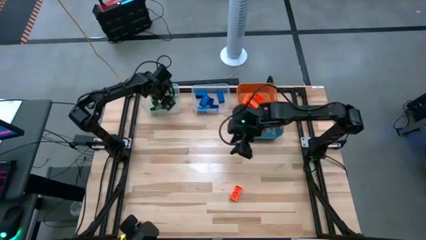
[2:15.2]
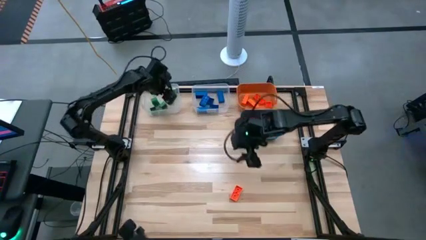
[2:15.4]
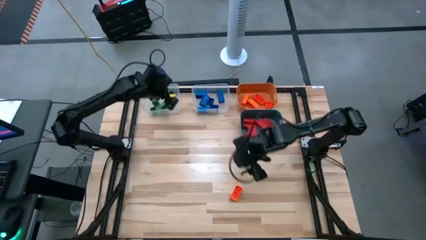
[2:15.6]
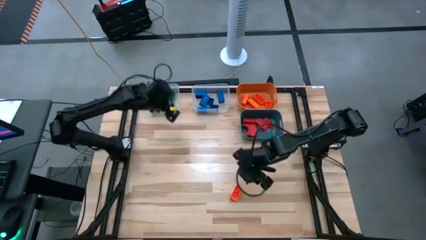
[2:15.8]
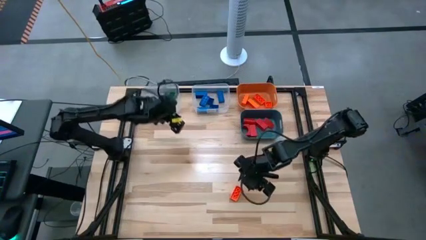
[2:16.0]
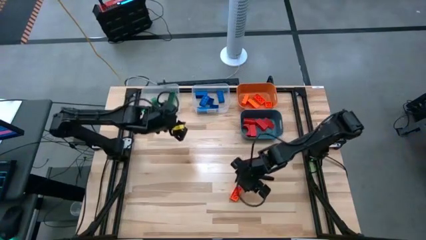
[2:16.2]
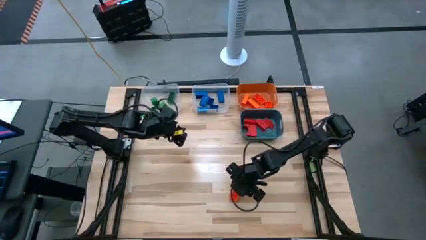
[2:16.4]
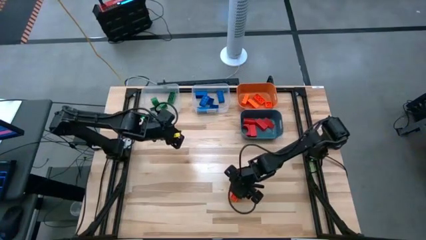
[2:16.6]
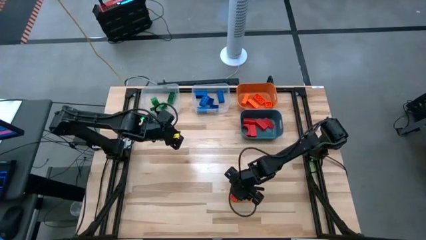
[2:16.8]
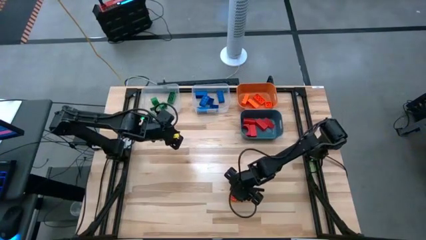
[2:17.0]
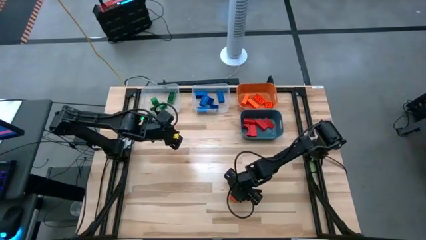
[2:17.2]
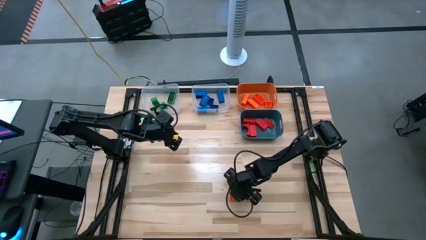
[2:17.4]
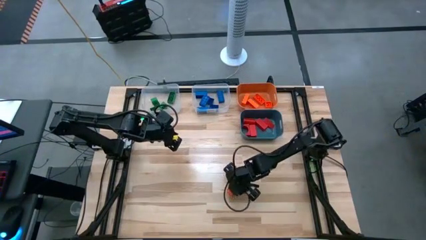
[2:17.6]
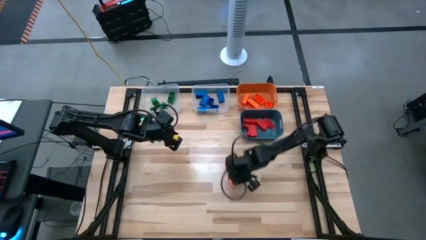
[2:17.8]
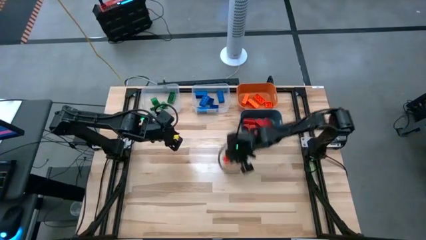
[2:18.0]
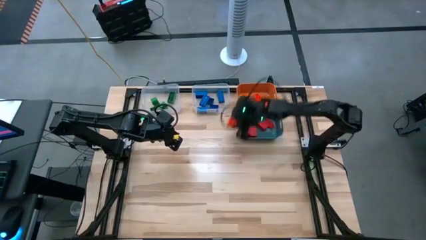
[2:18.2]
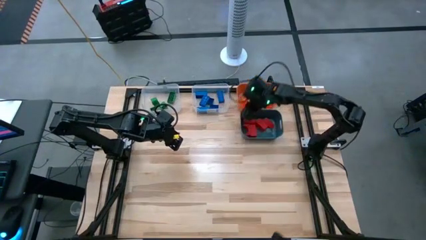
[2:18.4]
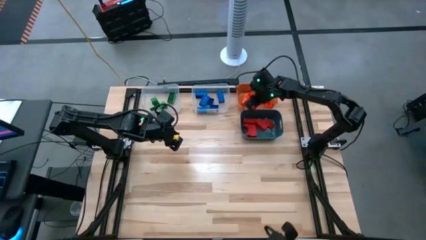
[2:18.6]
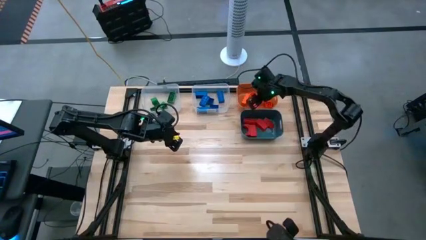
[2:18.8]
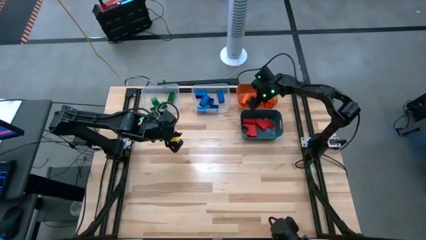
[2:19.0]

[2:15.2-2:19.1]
Task: Sort blocks
Put the orange game piece into the orange bin

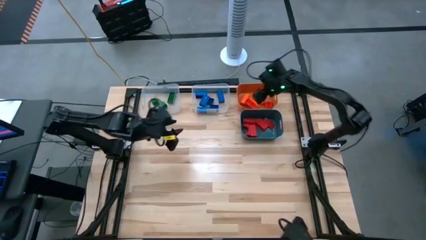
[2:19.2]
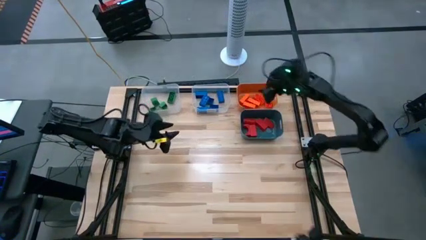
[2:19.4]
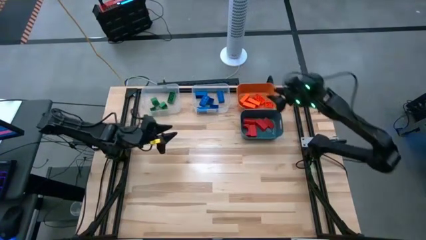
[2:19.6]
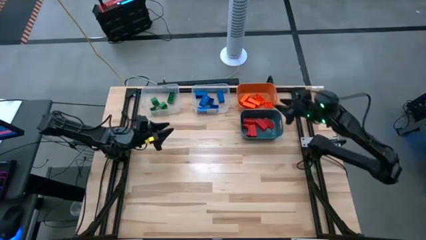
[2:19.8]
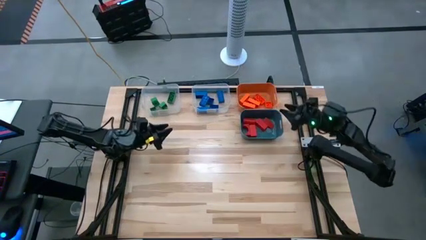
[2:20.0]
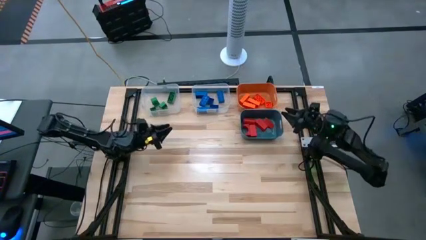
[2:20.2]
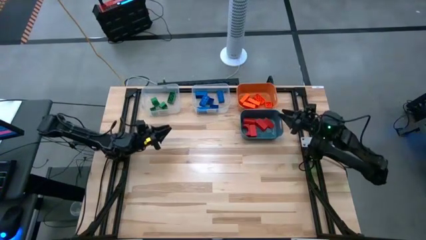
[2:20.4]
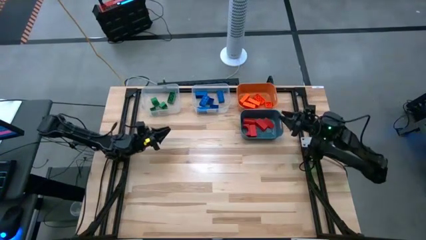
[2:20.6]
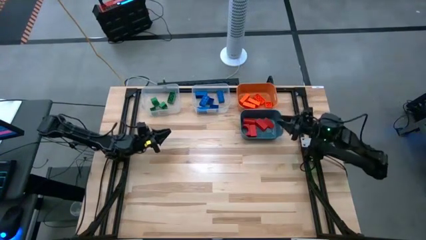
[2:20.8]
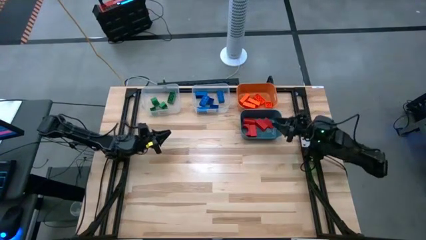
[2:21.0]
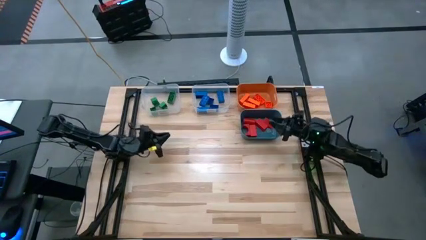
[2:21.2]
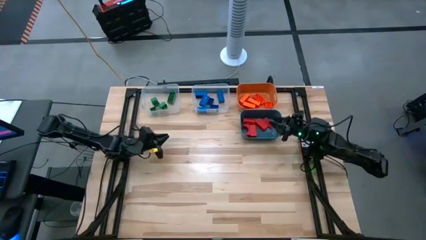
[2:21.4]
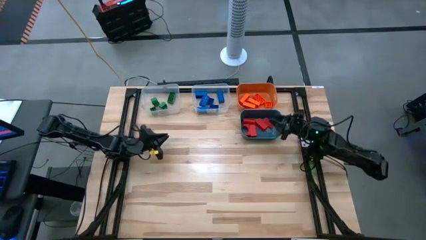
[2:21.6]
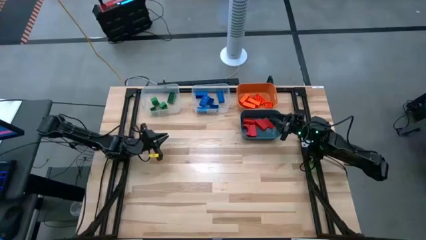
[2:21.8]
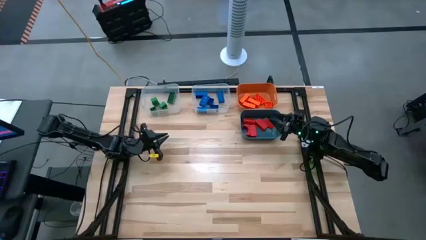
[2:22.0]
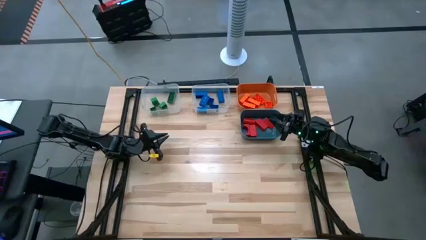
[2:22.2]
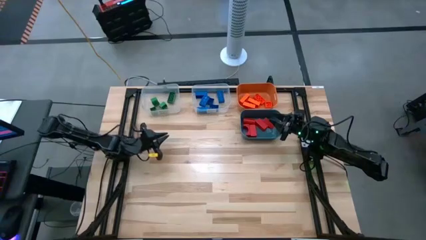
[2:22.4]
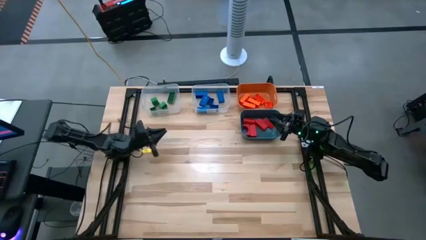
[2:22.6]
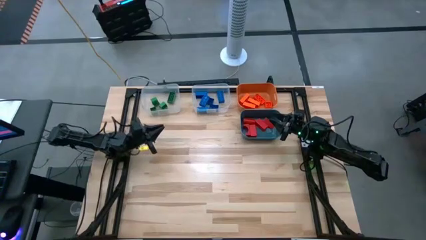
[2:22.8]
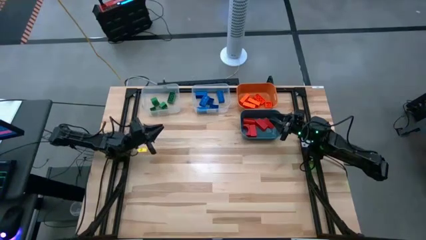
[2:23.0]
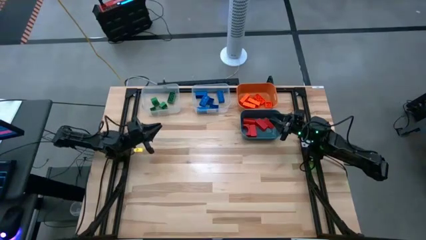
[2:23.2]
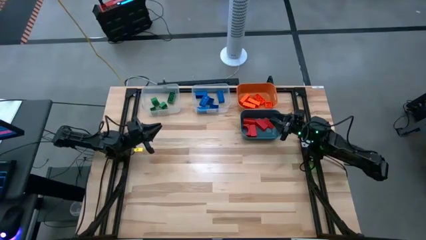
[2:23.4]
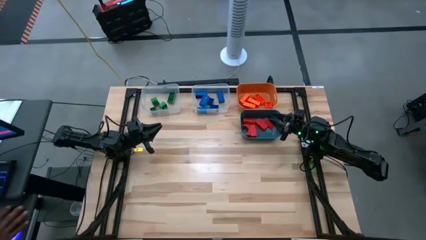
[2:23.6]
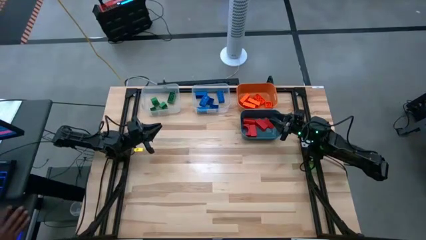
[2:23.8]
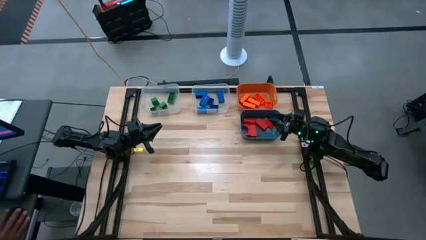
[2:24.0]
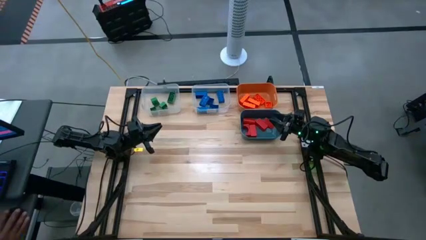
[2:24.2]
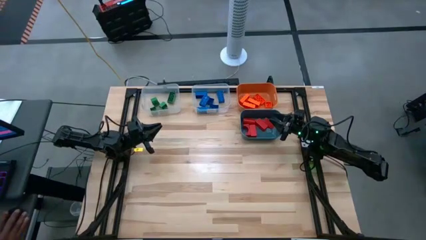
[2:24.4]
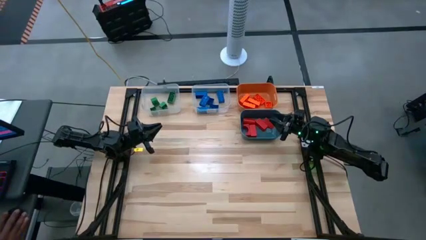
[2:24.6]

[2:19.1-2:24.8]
Return to Home Position
